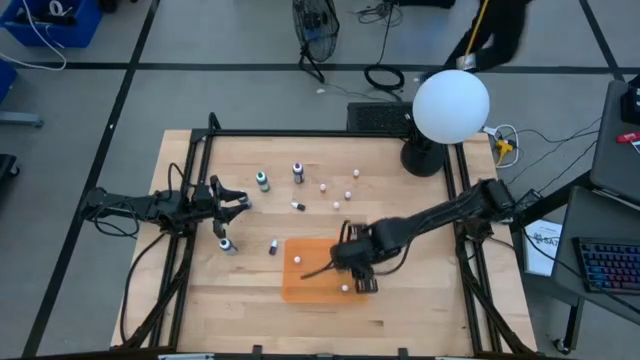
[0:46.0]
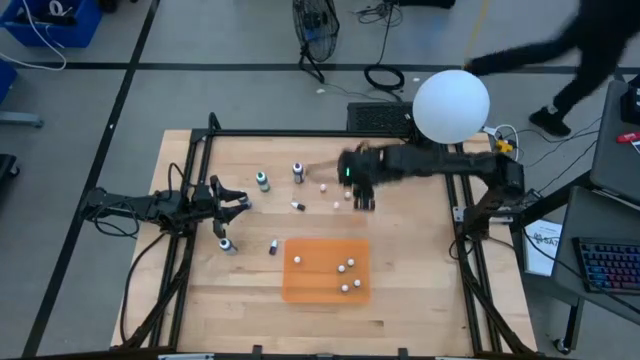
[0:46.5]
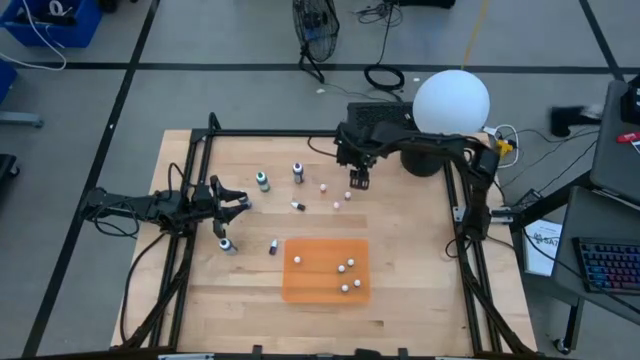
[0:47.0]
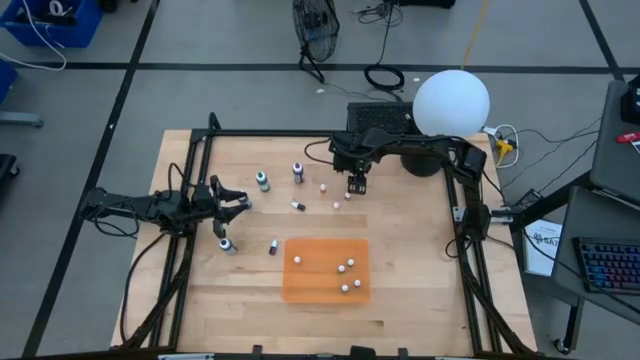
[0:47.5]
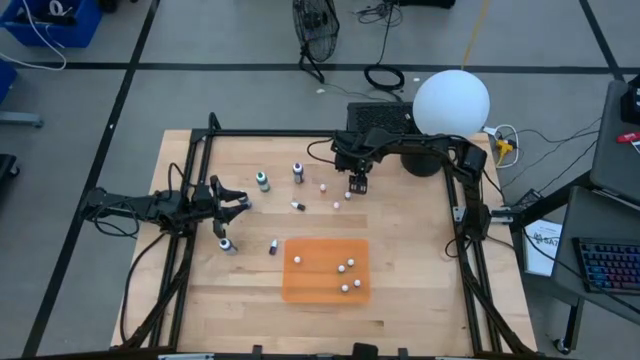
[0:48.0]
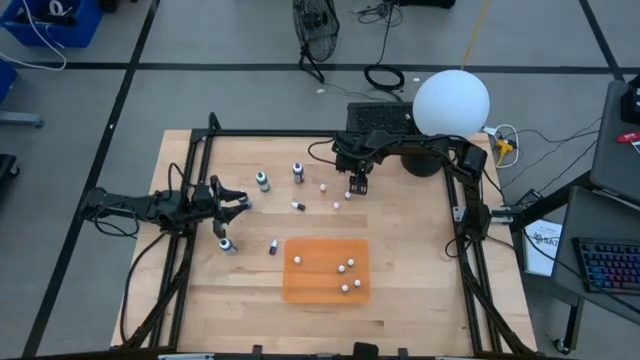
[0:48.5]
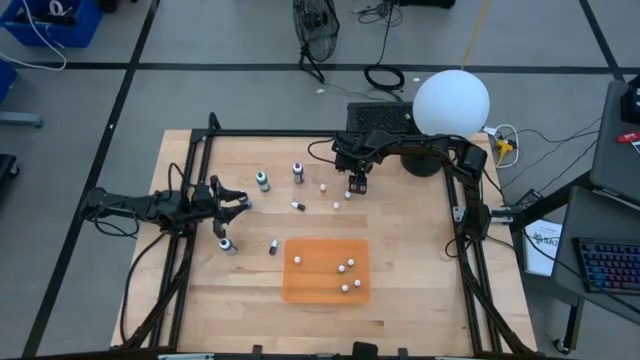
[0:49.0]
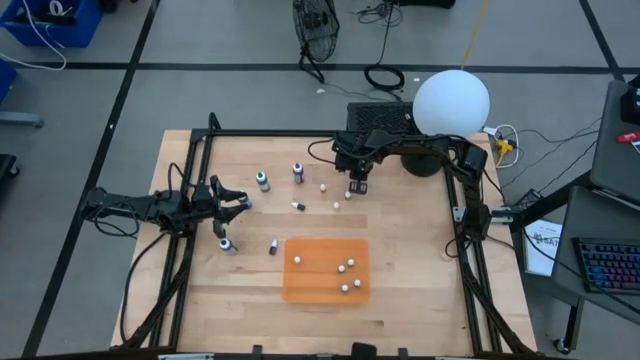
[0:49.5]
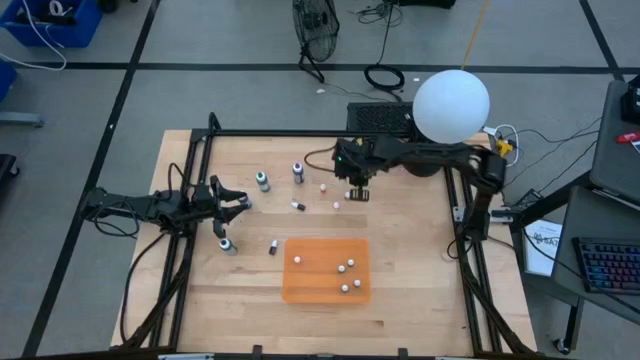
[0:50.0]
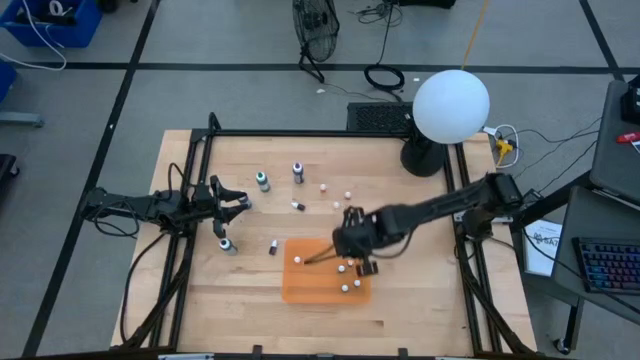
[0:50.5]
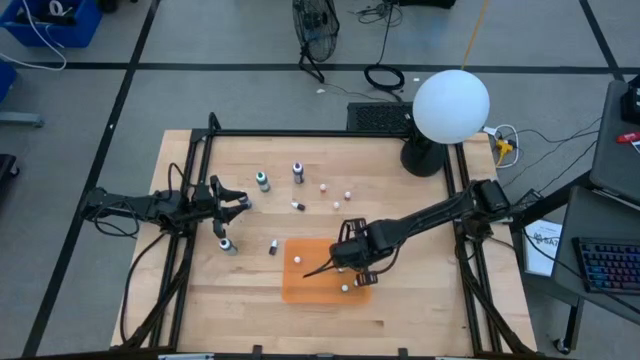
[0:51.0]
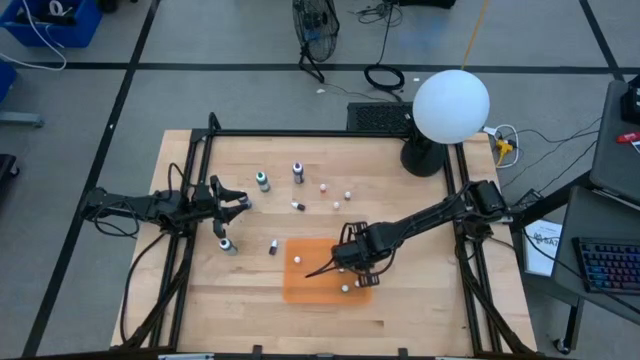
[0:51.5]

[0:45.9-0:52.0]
Task: Pick & Place food coloring
Put the small orange food coloring bottle into the orange bin

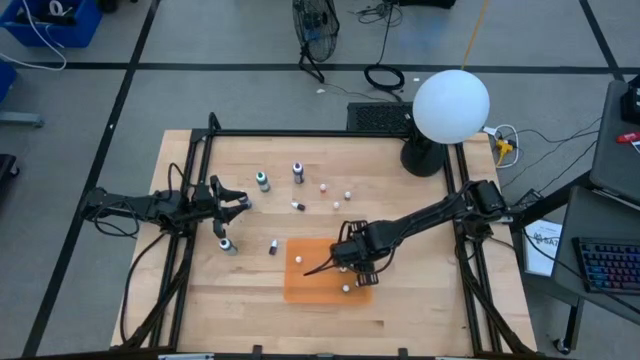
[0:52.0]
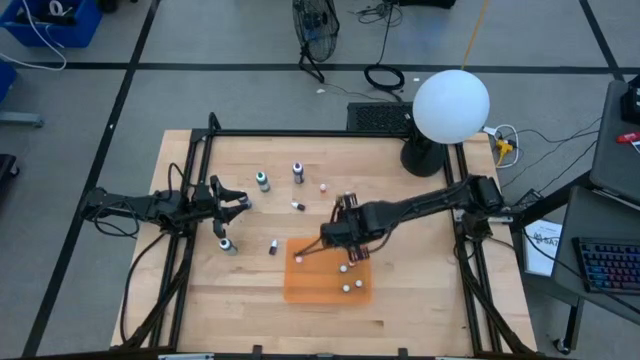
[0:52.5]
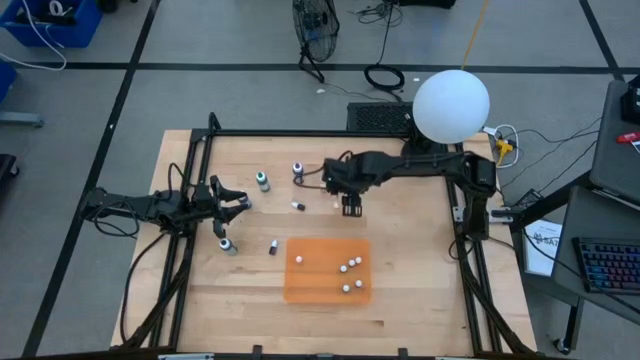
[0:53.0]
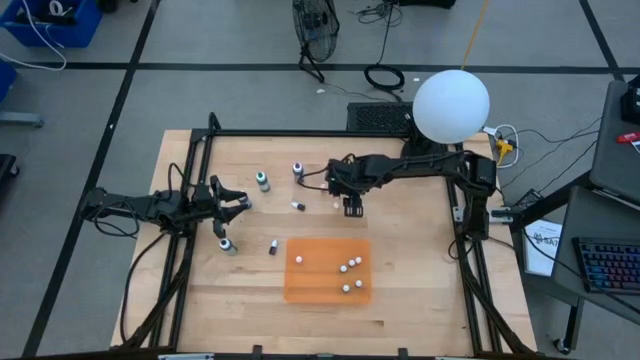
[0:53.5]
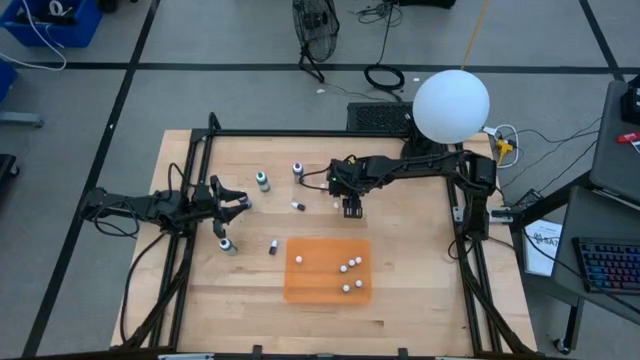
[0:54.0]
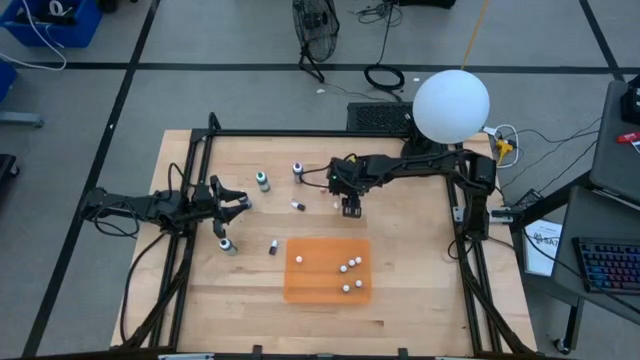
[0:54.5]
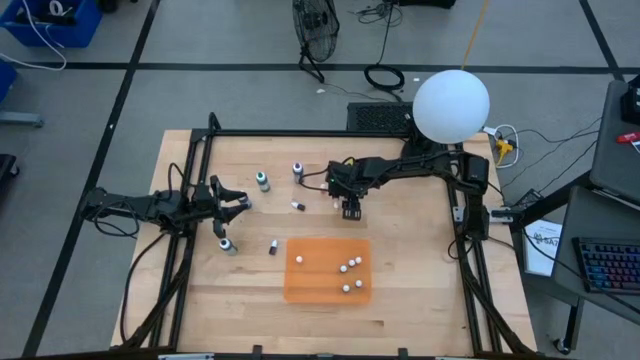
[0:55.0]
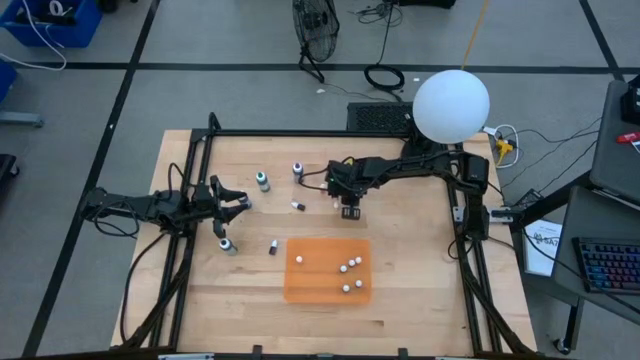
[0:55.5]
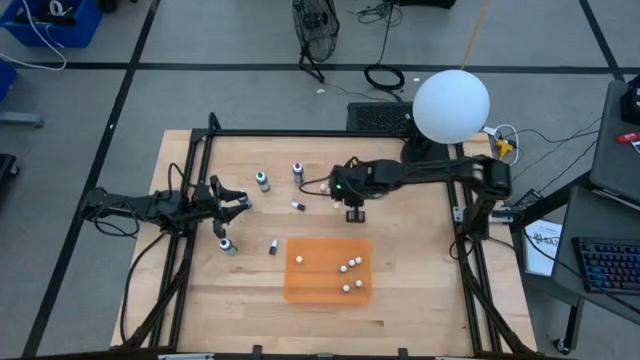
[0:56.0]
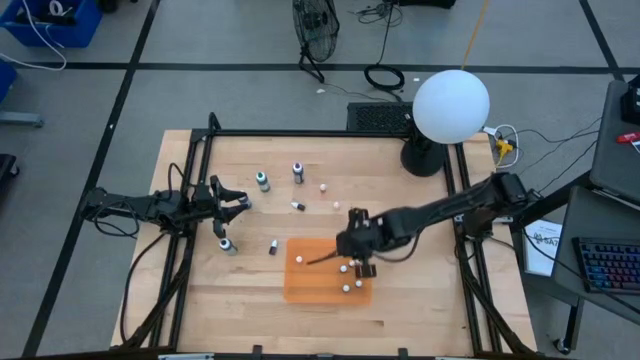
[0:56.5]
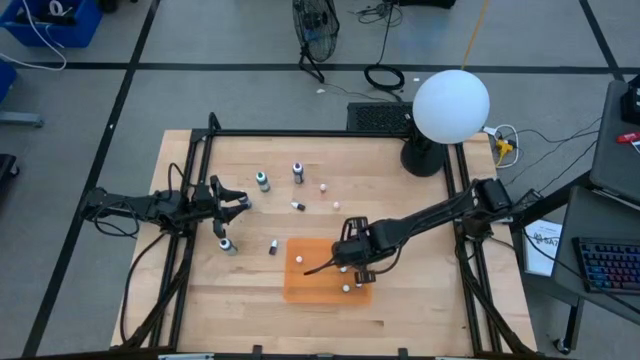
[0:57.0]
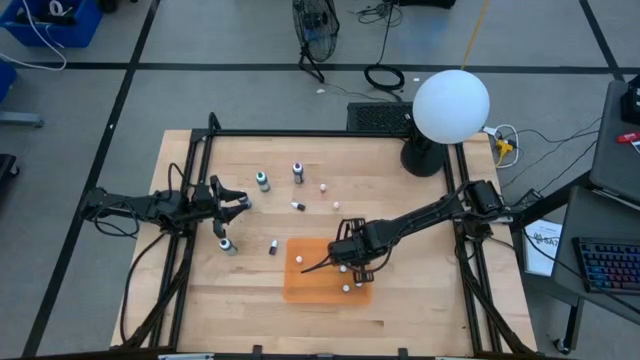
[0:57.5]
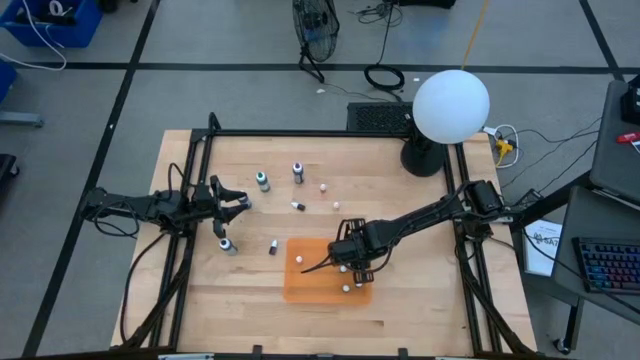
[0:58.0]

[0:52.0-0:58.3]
Put the small brown food coloring bottle into the orange bin

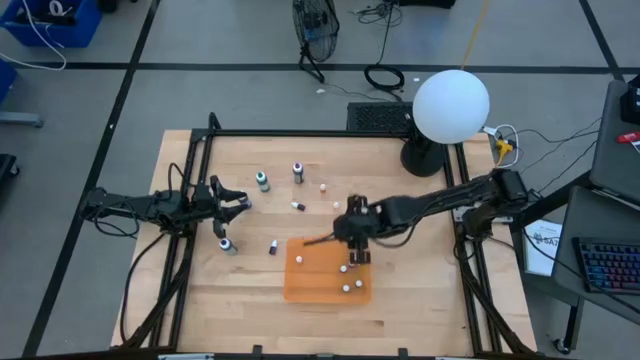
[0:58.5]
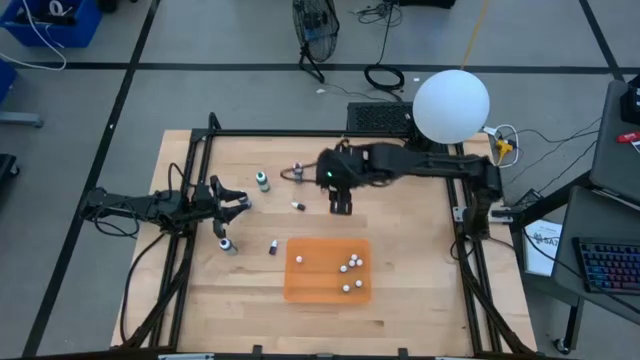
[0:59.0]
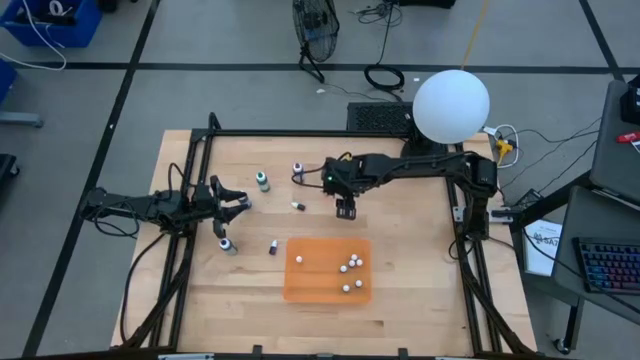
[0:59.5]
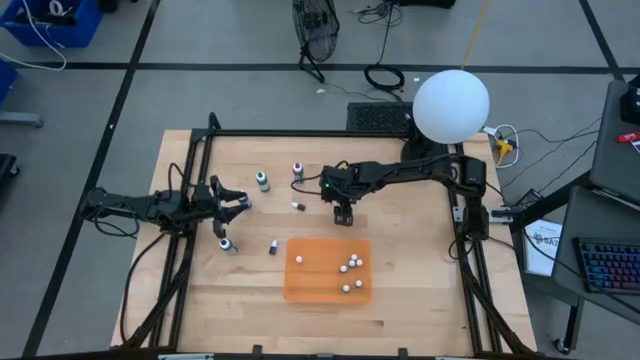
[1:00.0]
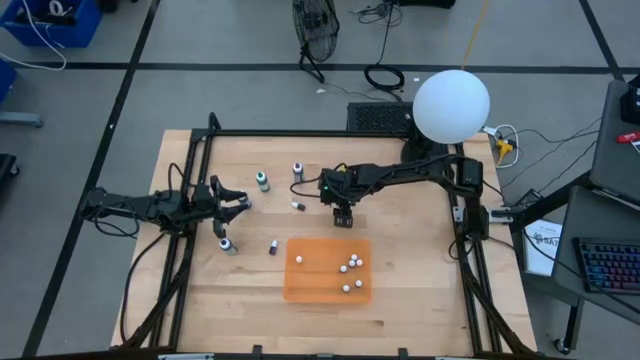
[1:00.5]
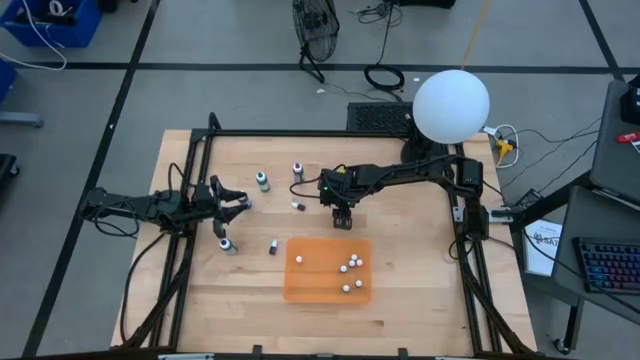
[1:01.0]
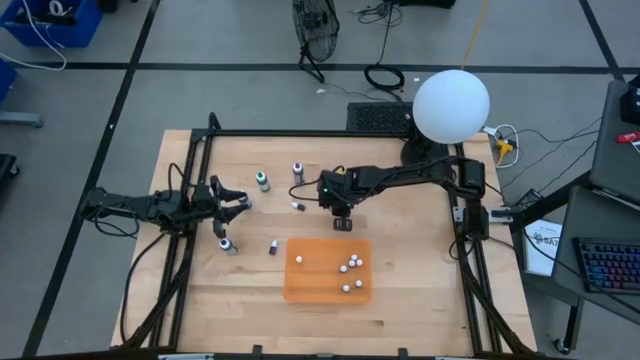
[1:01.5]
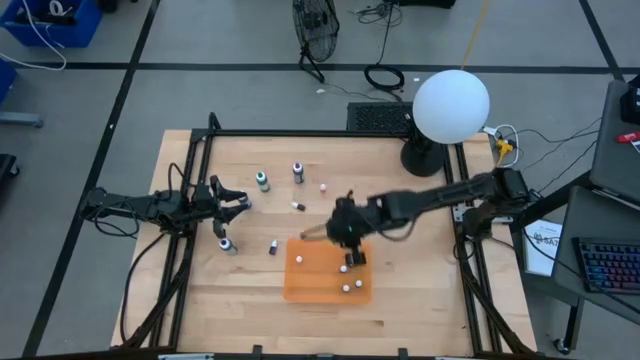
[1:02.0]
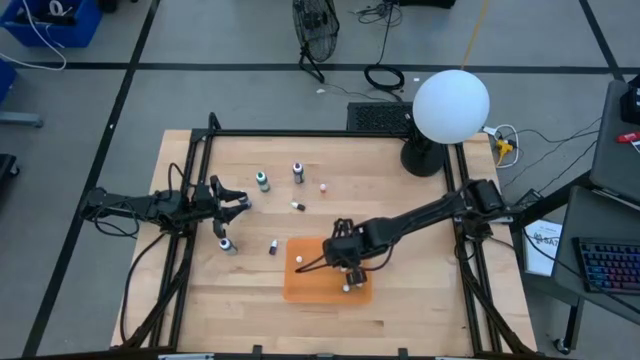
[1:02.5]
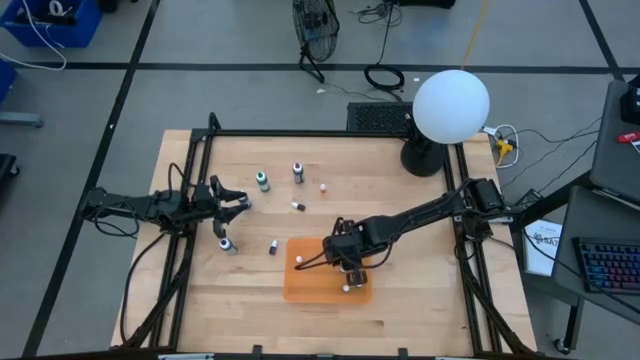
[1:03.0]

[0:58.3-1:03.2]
Put the small orange food coloring bottle into the orange bin

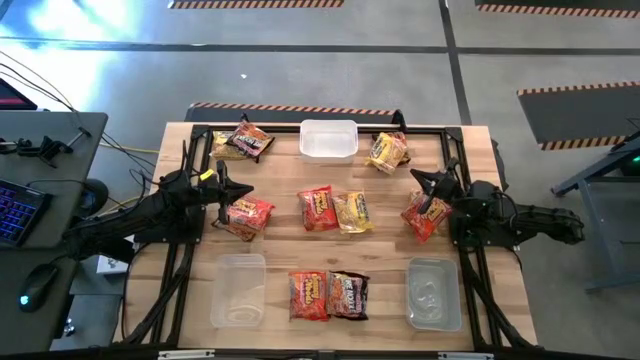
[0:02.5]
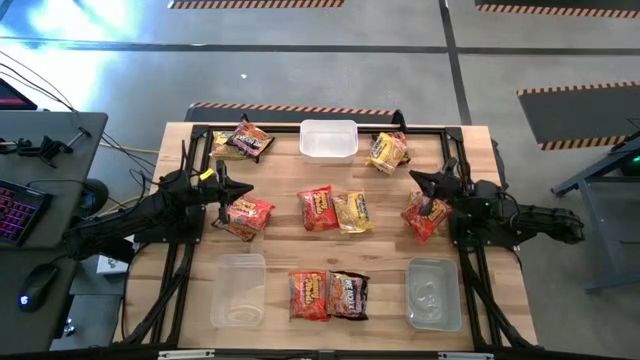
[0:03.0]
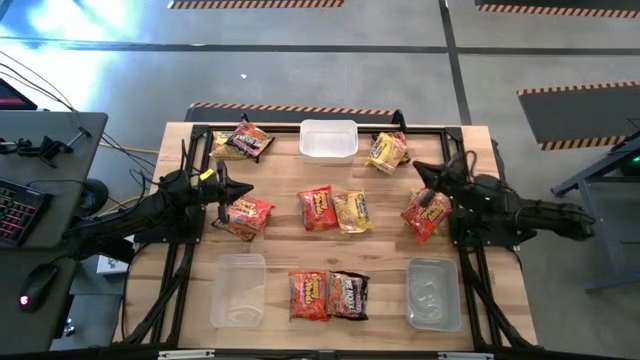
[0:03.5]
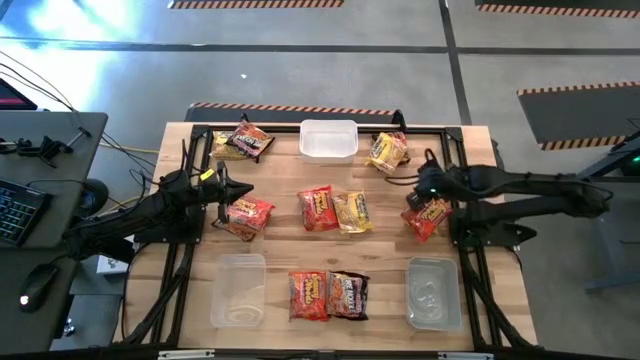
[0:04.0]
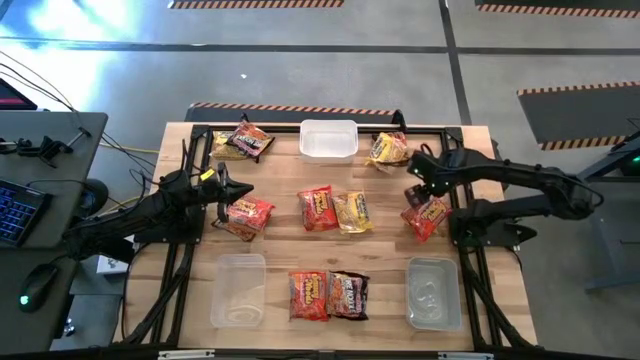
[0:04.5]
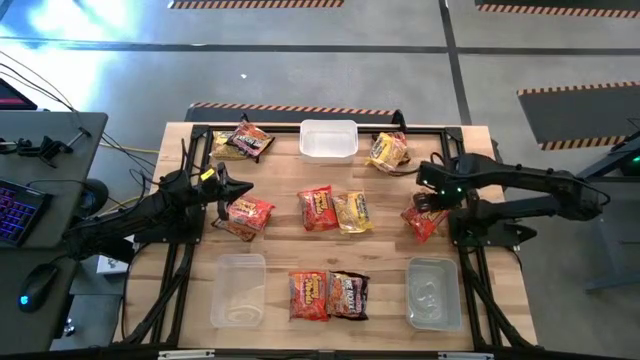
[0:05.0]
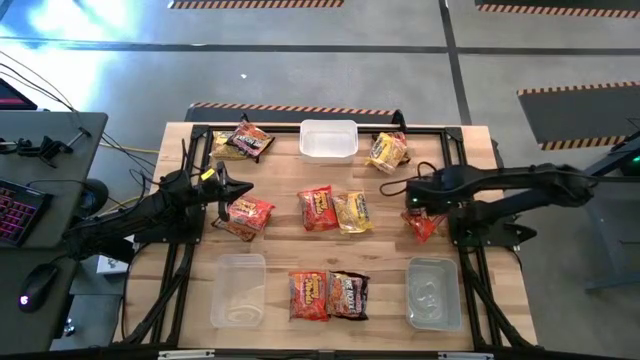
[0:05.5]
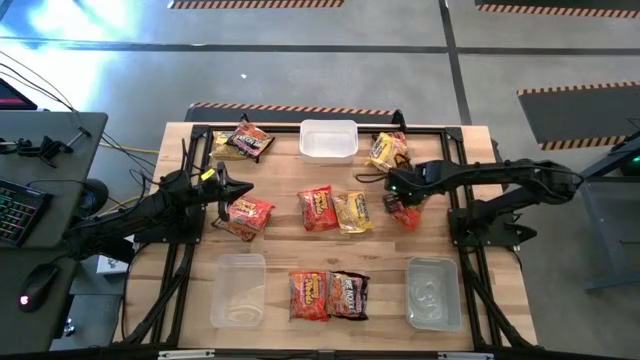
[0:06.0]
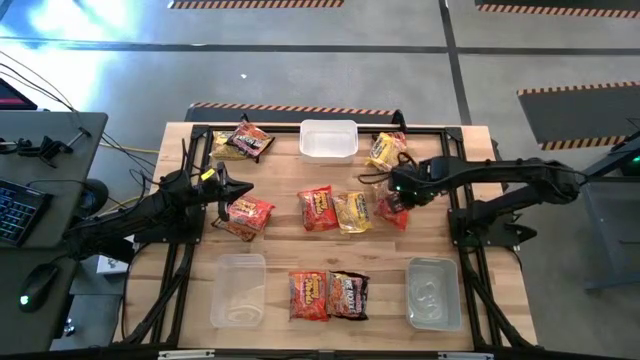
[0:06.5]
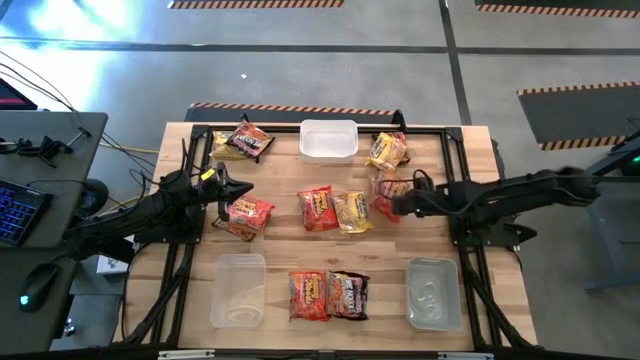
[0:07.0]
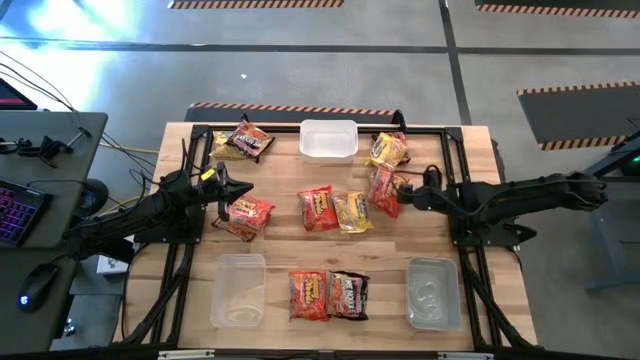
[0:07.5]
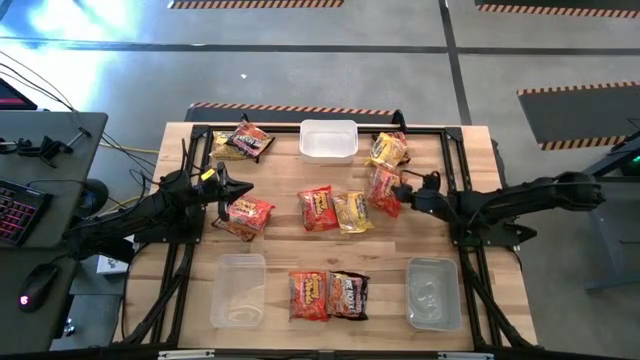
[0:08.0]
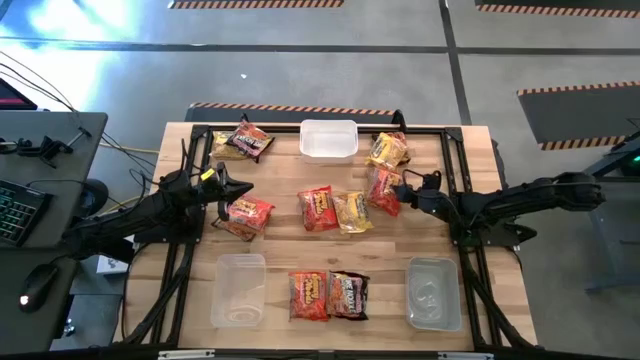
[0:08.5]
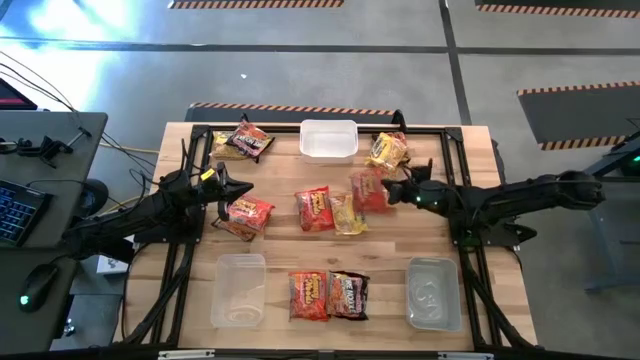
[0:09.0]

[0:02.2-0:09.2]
Task: Sort Maruchan noodles
Put the orange noodle pack into the white bin
